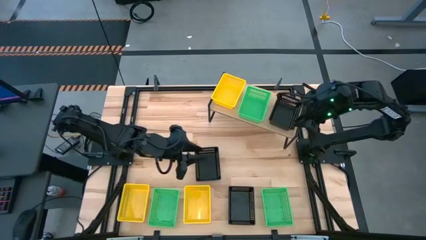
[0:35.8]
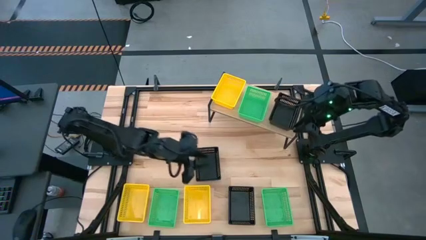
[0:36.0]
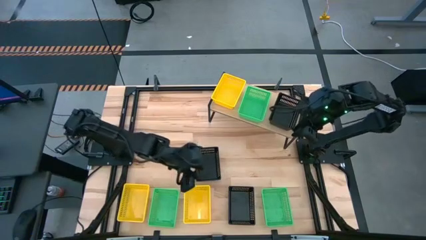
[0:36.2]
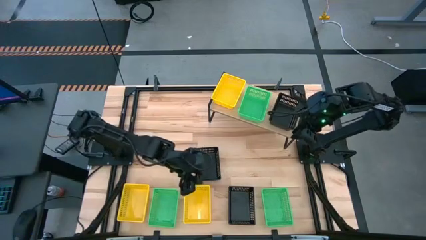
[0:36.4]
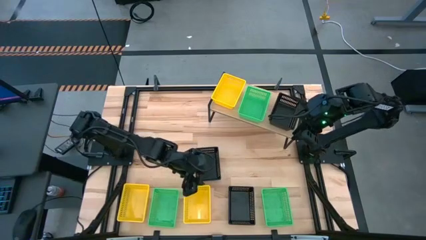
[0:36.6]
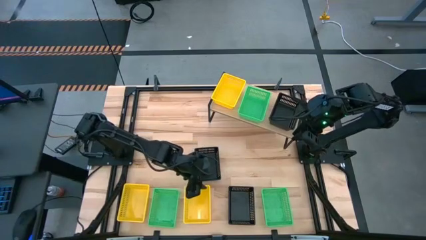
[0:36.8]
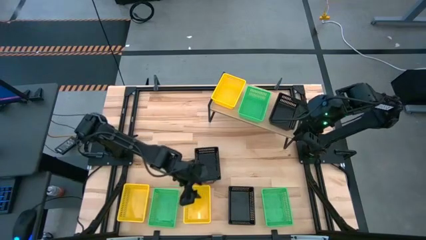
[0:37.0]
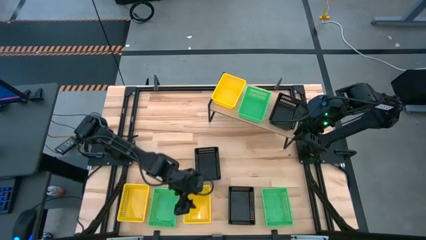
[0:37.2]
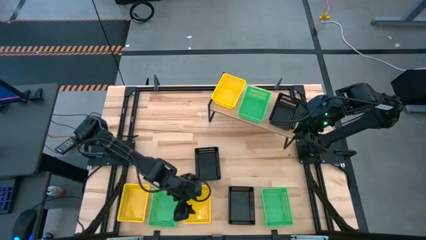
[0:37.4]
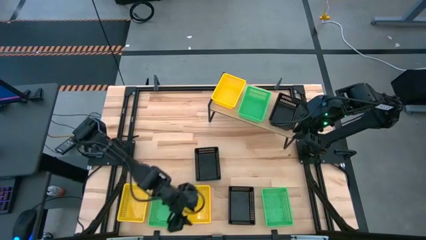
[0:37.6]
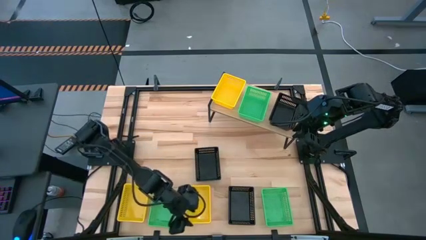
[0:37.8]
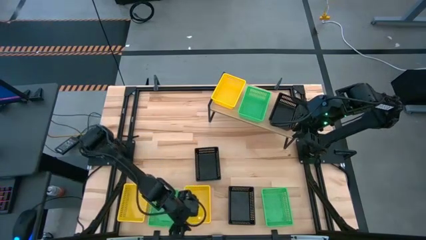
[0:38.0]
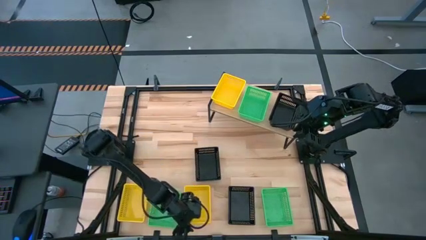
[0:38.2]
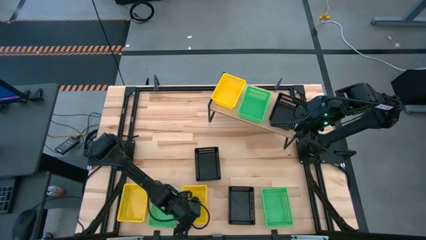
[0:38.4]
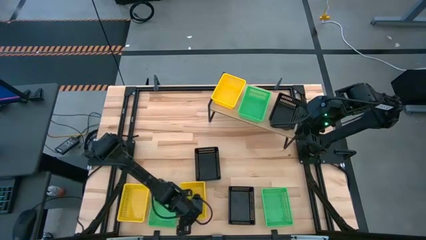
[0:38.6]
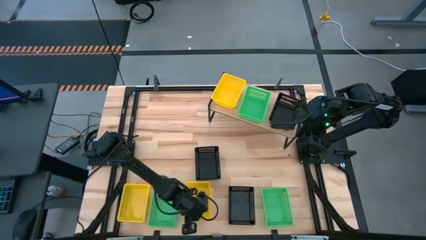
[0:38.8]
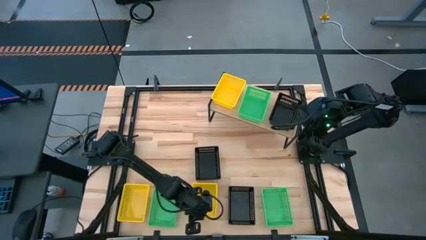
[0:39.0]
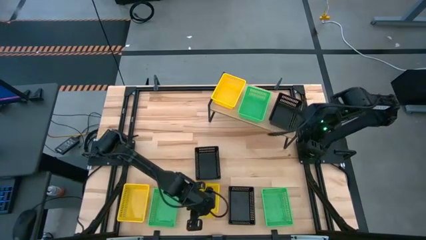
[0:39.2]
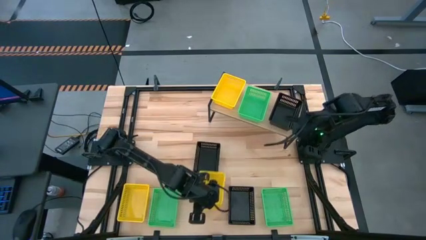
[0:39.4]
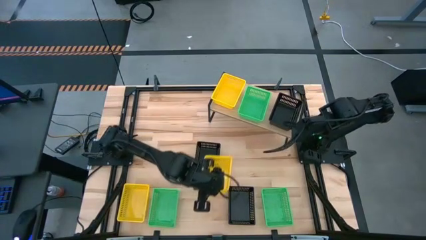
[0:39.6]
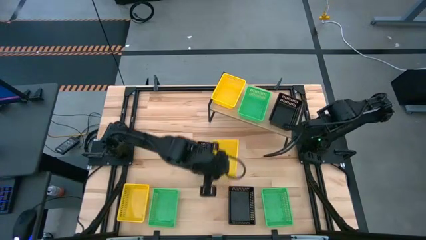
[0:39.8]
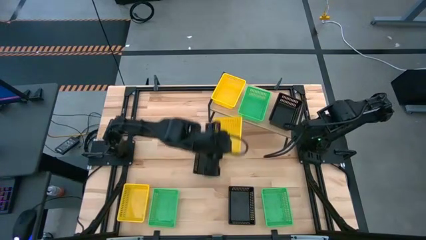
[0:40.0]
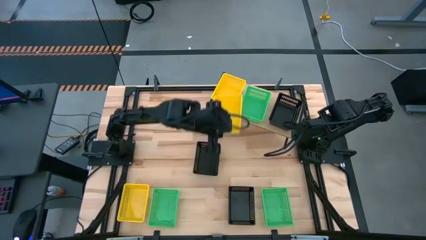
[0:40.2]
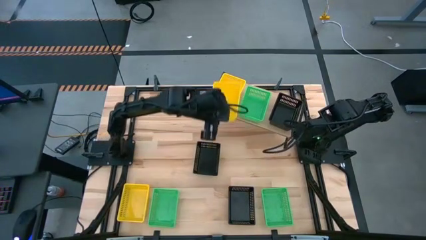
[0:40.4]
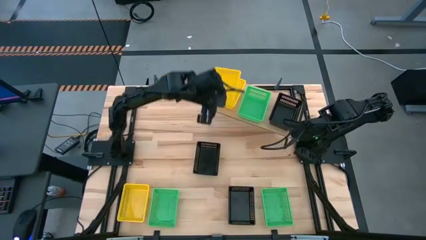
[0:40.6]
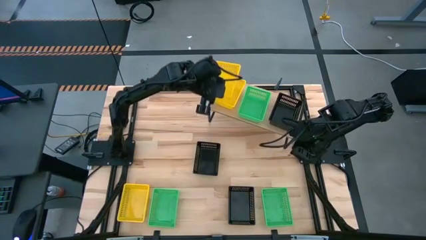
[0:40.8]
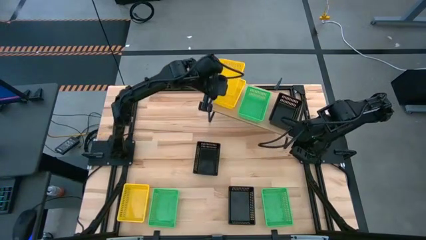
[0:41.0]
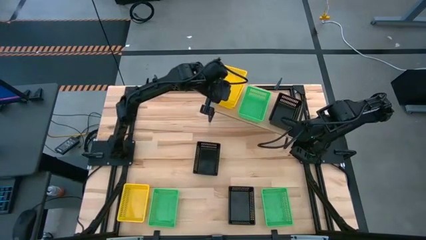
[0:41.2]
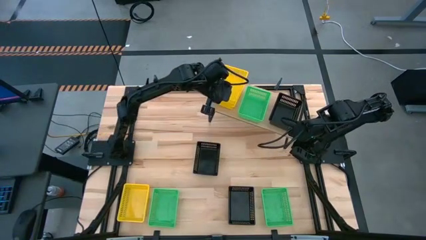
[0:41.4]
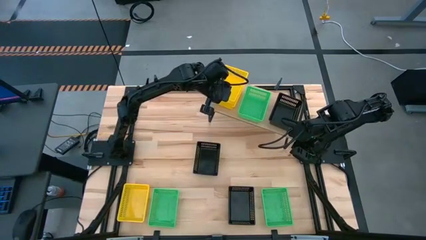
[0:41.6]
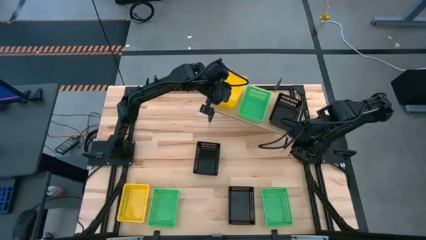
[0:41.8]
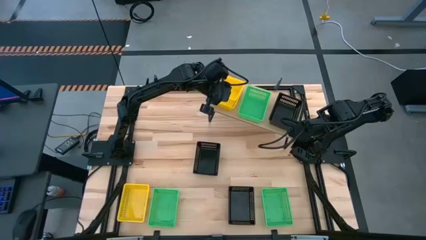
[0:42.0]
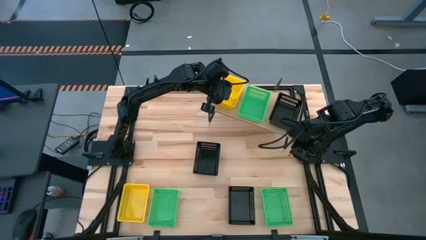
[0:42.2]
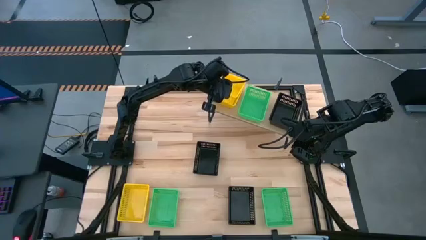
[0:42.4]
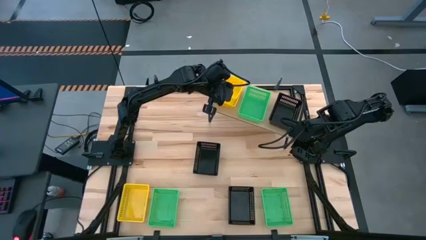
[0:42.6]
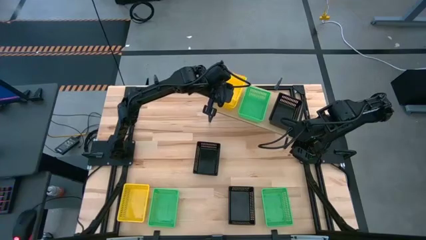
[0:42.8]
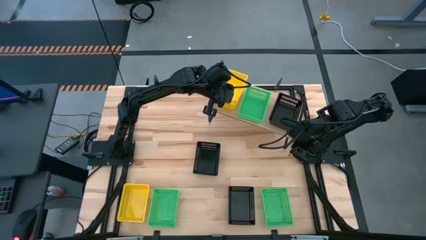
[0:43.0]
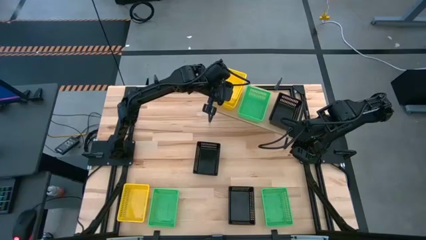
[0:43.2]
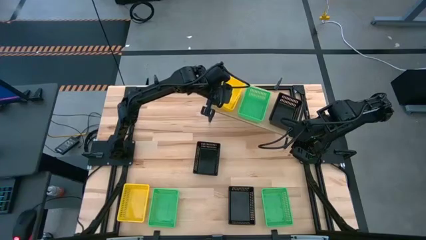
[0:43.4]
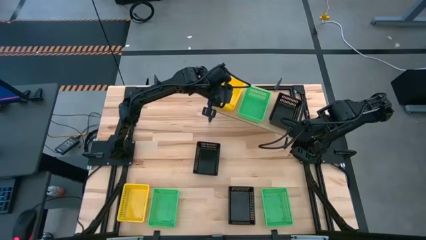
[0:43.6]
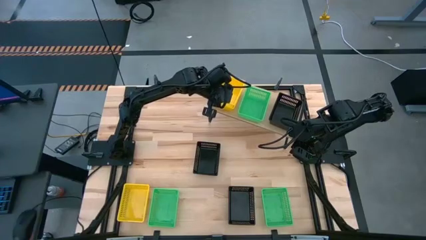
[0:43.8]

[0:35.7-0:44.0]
Task: Stack baskets on shelf by color
Stack the right yellow bin on the yellow bin

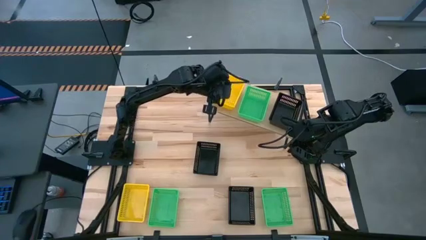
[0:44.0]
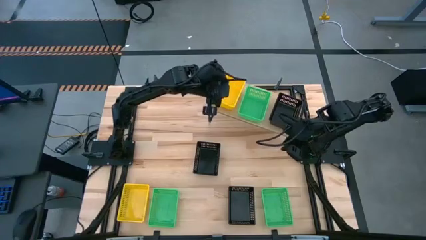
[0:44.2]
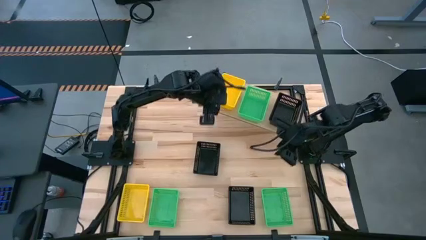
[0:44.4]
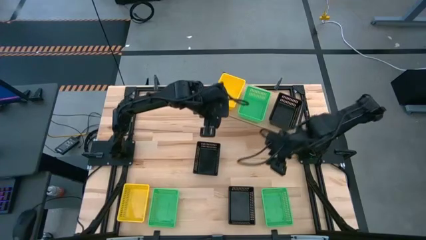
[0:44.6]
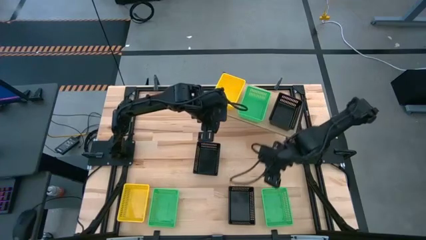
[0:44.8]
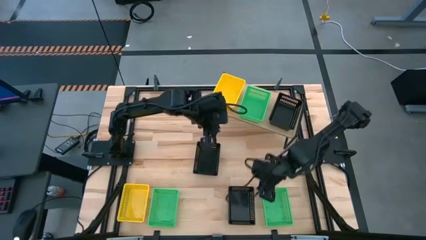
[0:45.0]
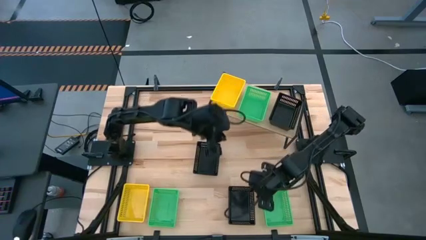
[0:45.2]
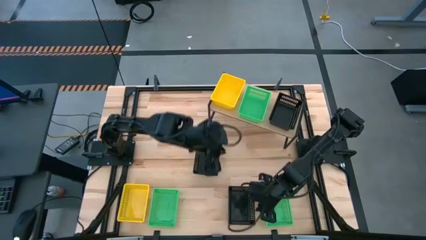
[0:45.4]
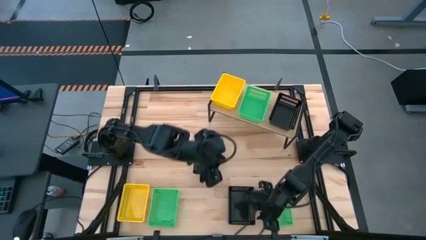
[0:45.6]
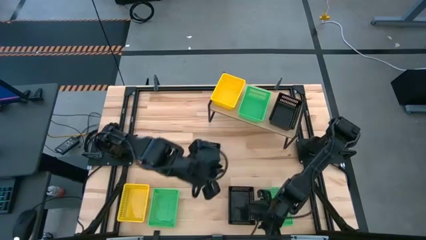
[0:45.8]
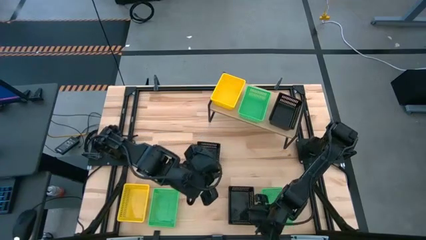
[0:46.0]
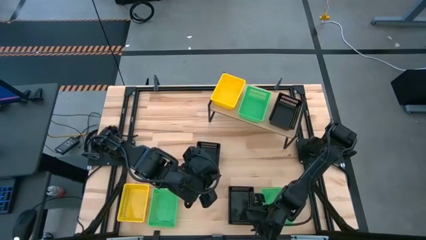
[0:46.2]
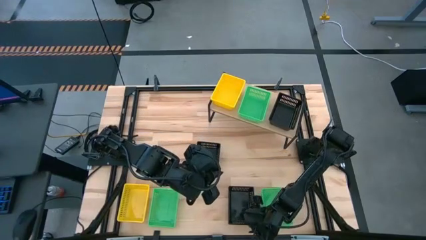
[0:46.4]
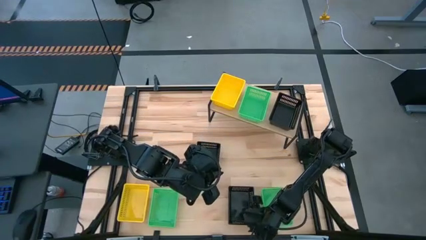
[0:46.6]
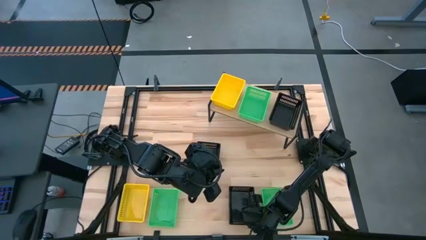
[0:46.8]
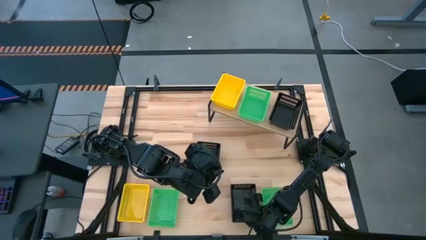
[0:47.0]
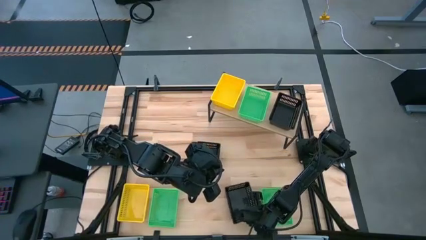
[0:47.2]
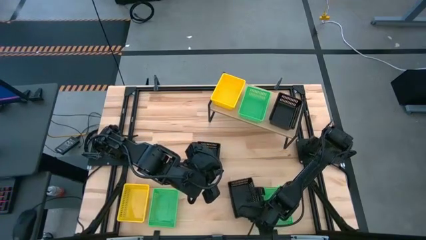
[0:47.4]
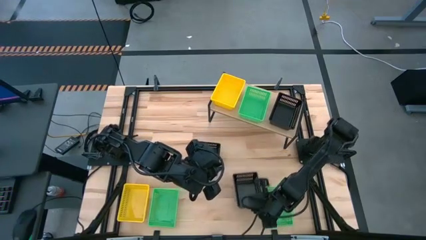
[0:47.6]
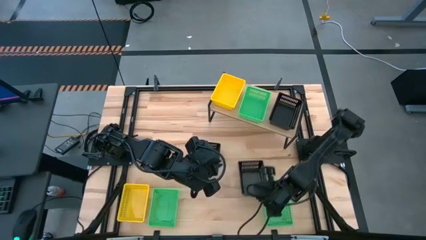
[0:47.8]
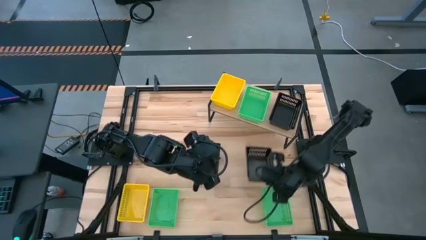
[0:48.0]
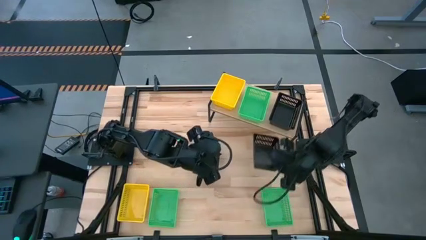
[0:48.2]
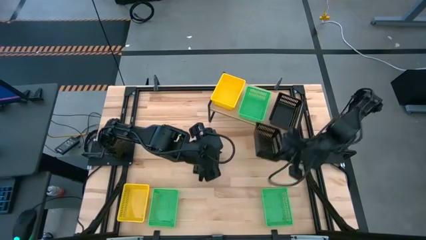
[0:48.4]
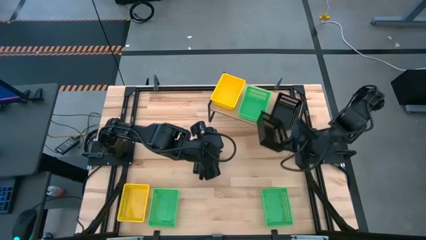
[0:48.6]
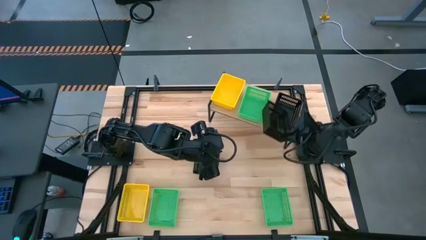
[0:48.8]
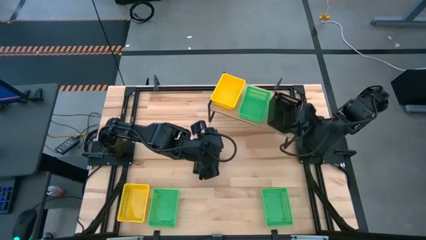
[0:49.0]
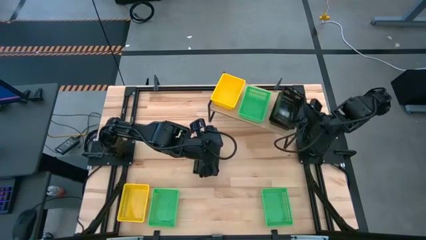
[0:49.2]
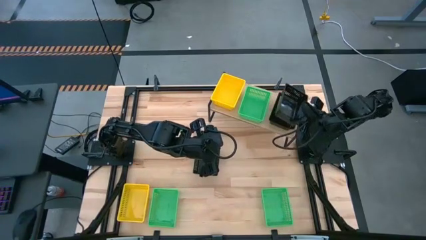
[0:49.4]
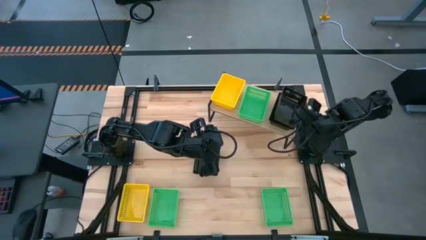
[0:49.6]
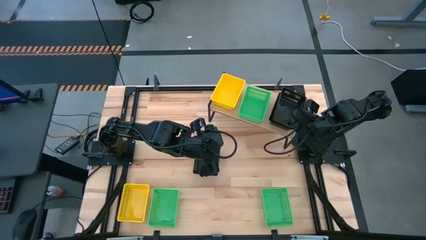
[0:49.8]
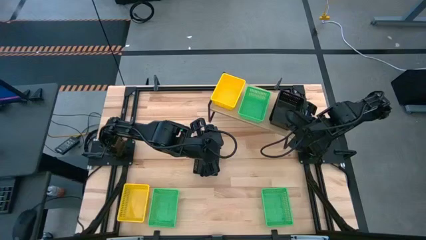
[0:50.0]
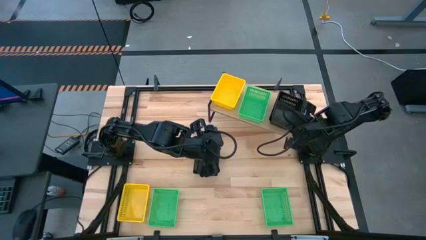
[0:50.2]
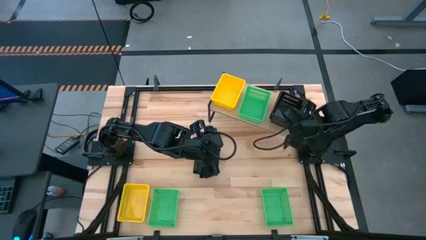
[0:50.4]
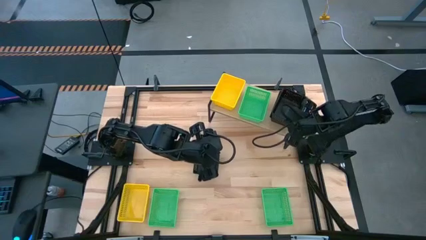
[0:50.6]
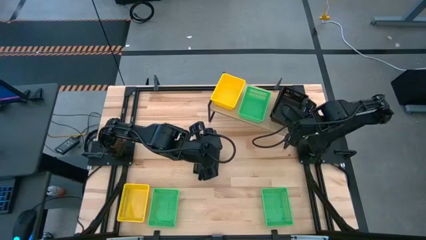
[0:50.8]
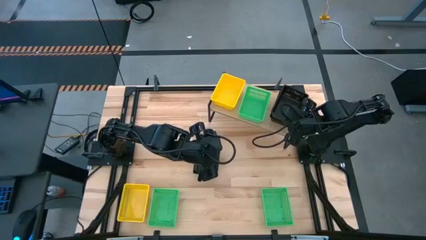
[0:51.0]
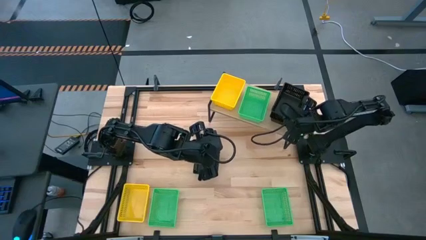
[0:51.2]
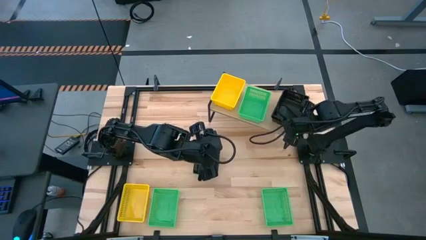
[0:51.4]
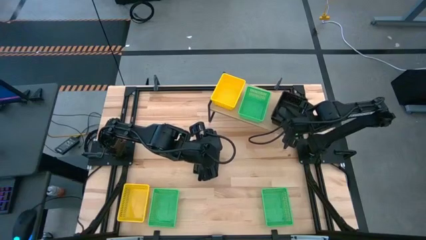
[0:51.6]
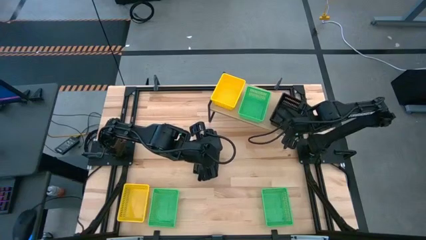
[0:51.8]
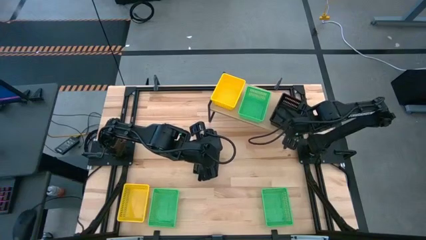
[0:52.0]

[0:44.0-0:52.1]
Stack the bottom black bin on the black bin
